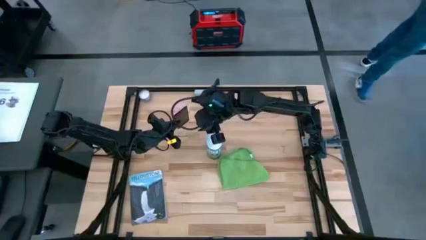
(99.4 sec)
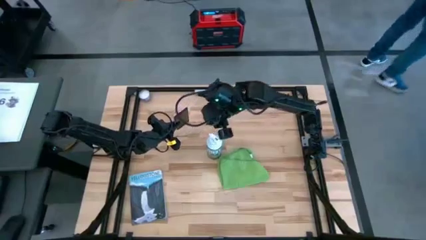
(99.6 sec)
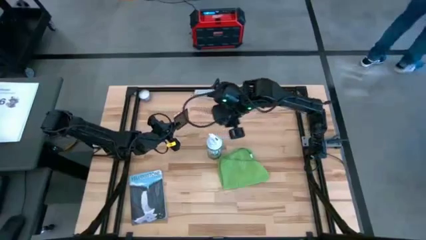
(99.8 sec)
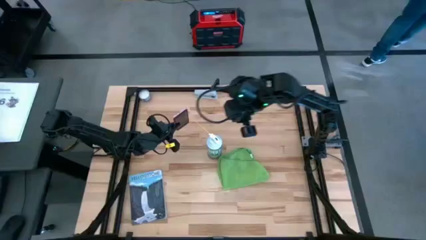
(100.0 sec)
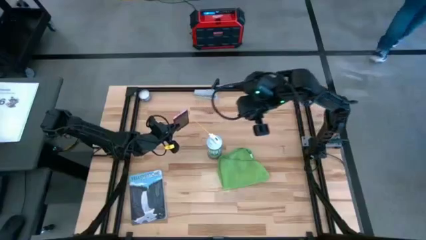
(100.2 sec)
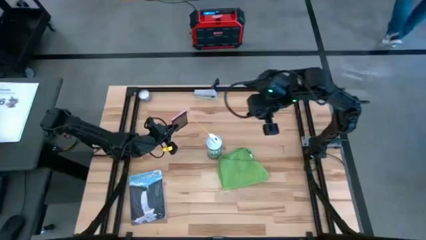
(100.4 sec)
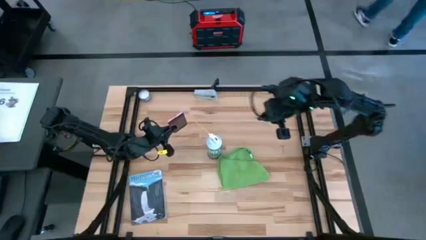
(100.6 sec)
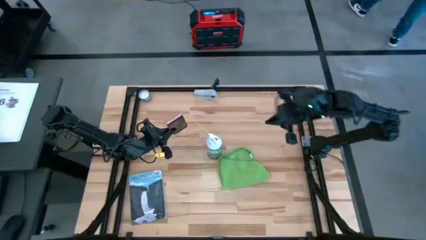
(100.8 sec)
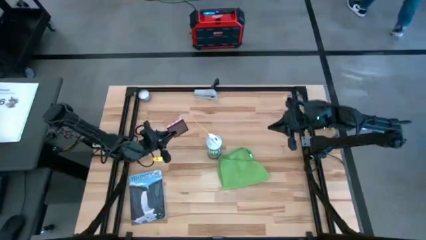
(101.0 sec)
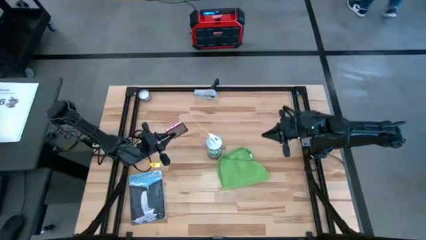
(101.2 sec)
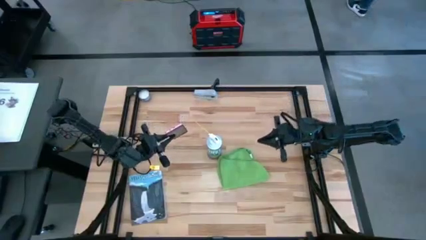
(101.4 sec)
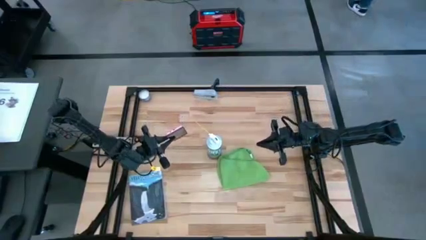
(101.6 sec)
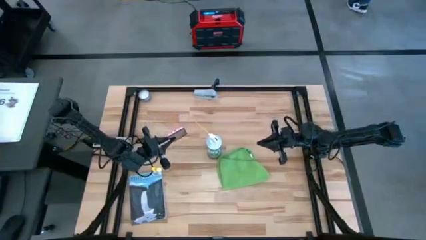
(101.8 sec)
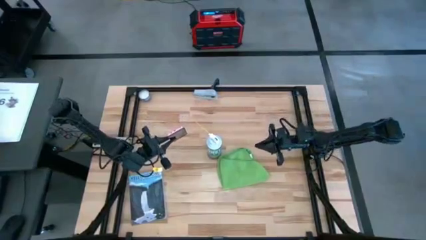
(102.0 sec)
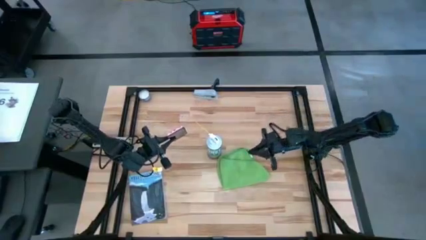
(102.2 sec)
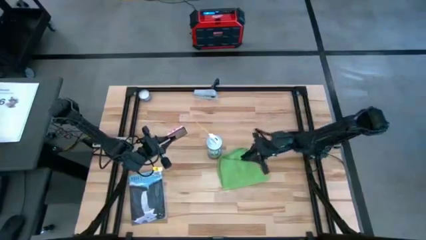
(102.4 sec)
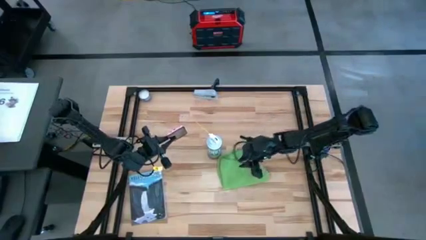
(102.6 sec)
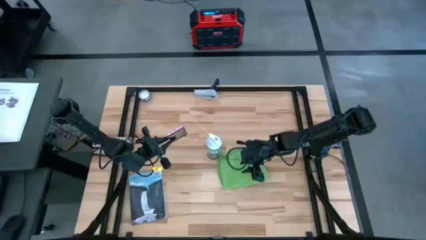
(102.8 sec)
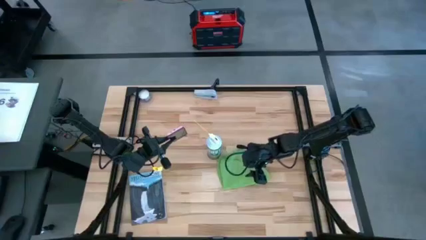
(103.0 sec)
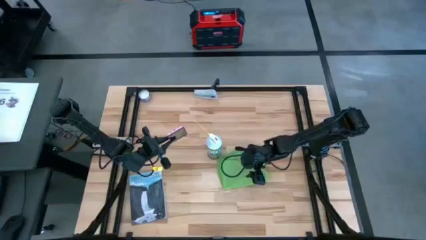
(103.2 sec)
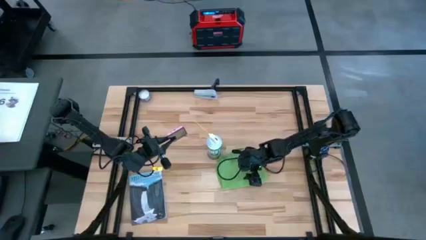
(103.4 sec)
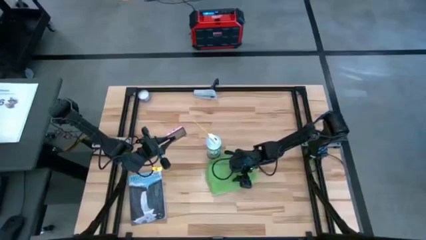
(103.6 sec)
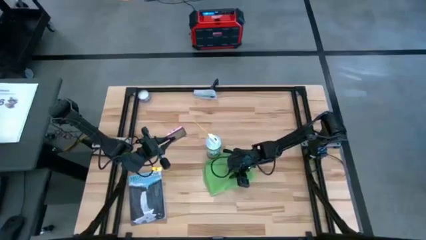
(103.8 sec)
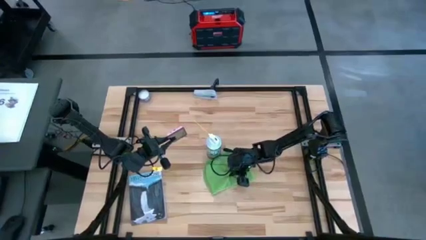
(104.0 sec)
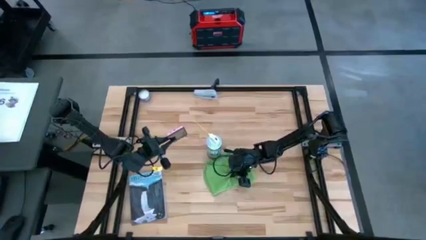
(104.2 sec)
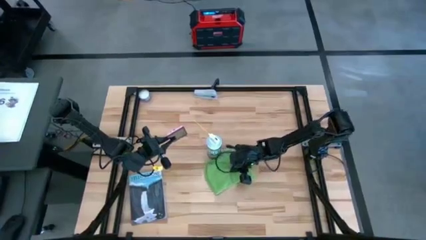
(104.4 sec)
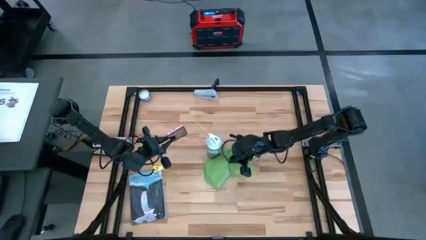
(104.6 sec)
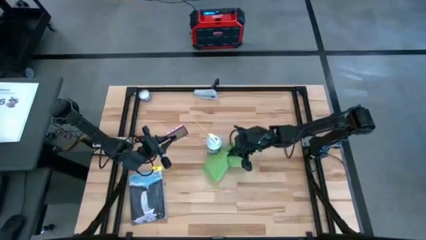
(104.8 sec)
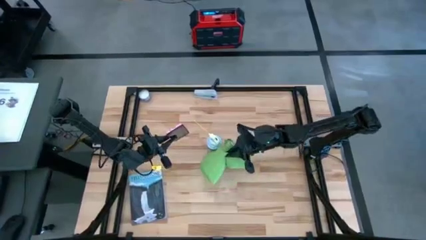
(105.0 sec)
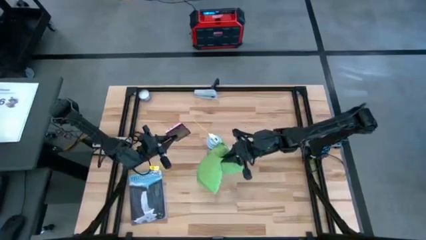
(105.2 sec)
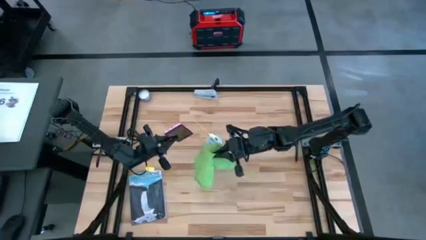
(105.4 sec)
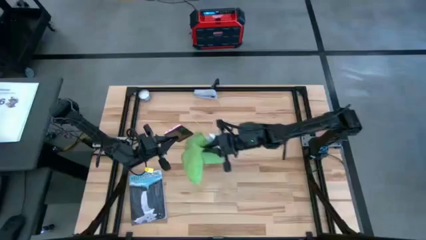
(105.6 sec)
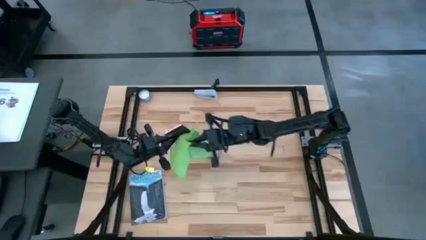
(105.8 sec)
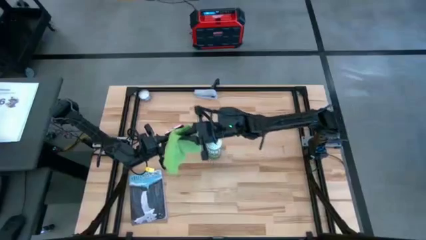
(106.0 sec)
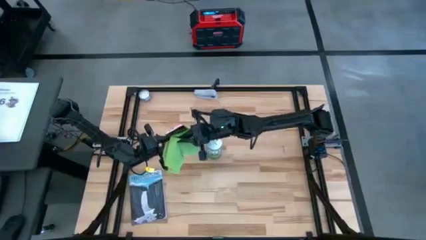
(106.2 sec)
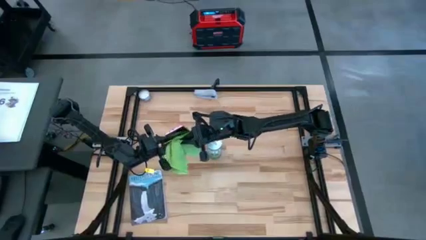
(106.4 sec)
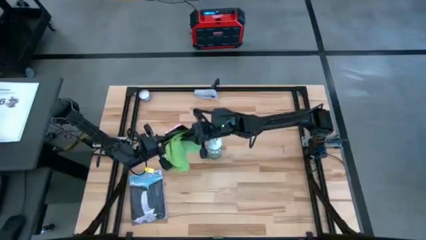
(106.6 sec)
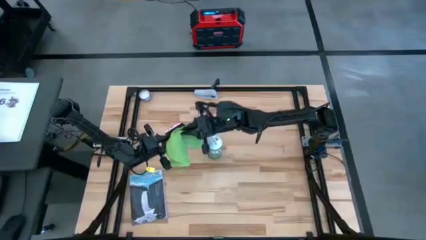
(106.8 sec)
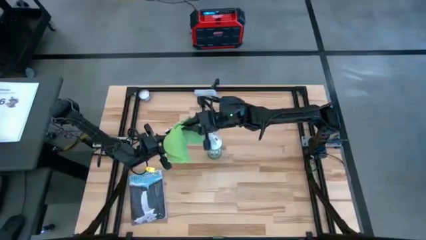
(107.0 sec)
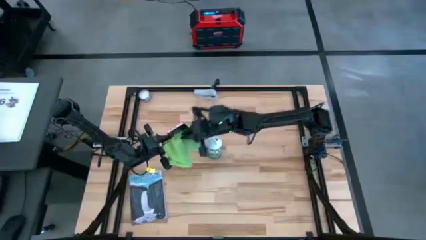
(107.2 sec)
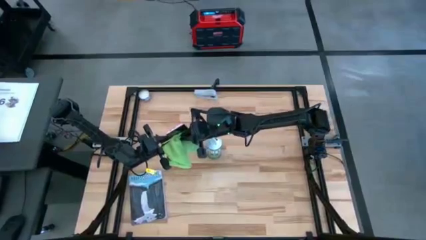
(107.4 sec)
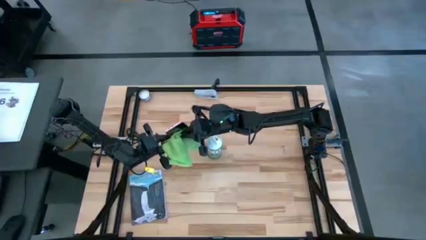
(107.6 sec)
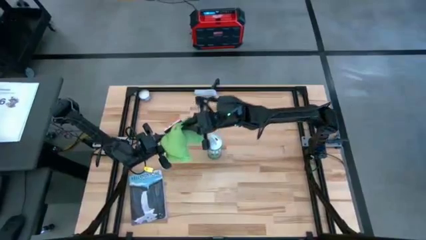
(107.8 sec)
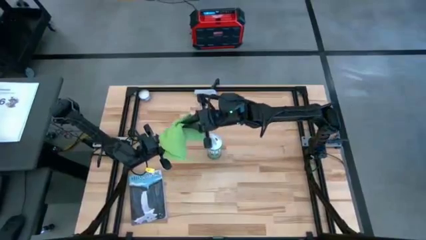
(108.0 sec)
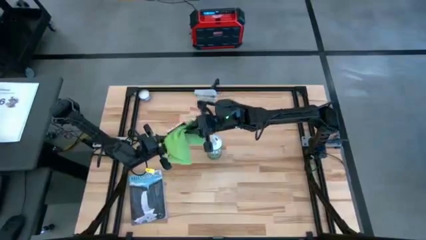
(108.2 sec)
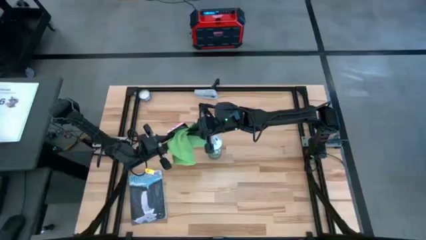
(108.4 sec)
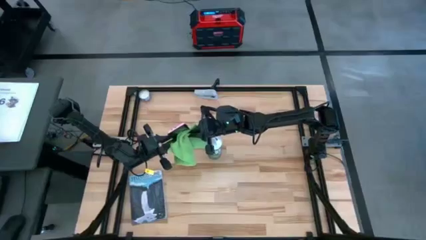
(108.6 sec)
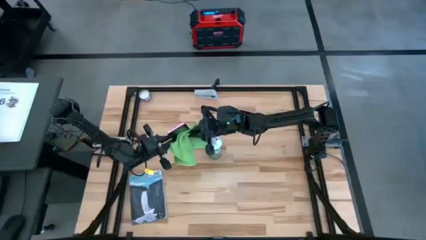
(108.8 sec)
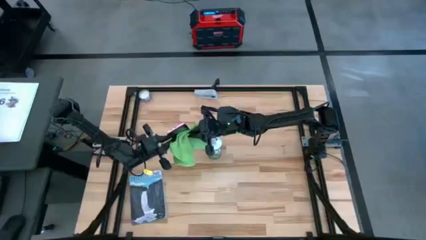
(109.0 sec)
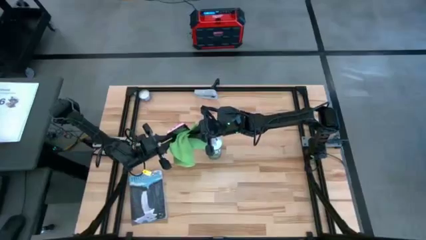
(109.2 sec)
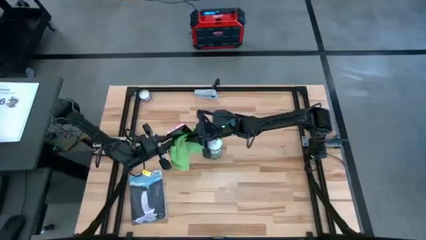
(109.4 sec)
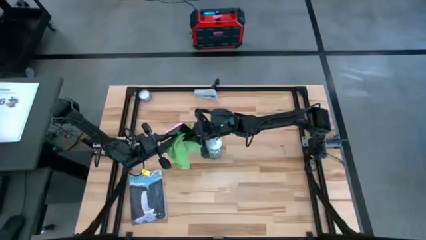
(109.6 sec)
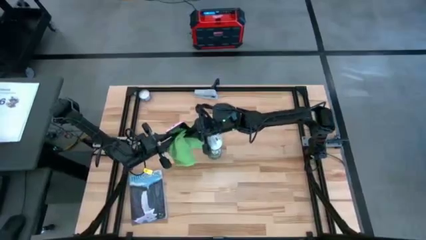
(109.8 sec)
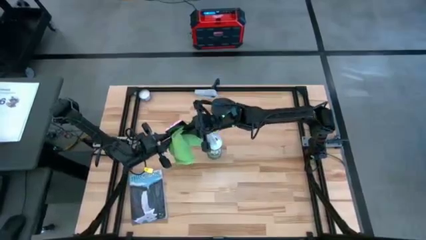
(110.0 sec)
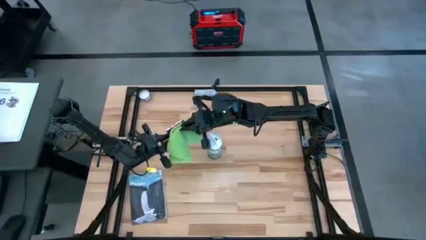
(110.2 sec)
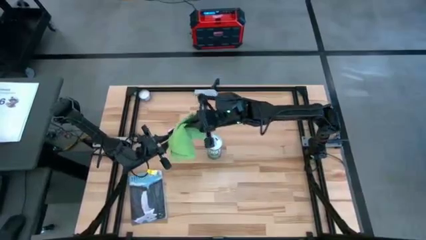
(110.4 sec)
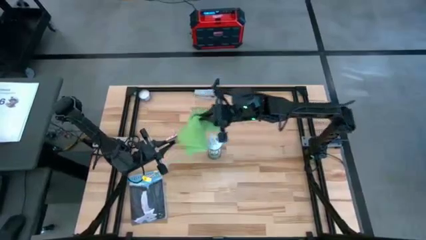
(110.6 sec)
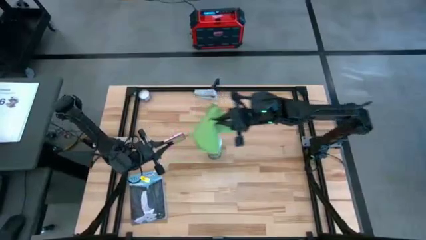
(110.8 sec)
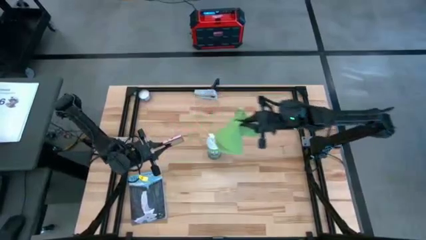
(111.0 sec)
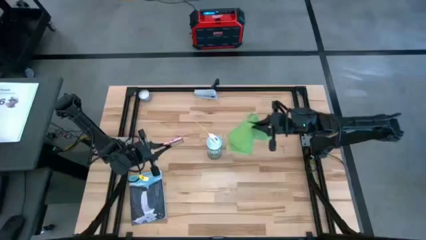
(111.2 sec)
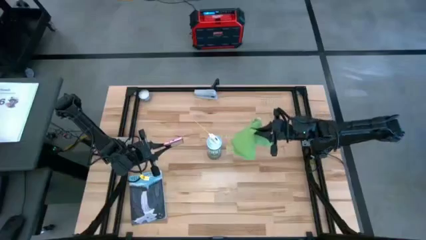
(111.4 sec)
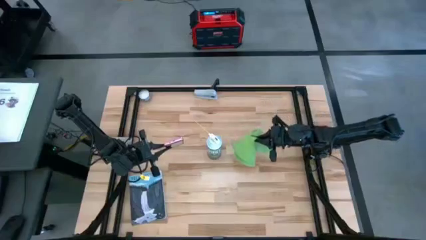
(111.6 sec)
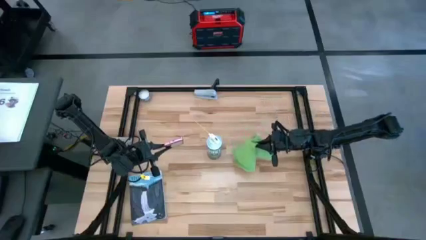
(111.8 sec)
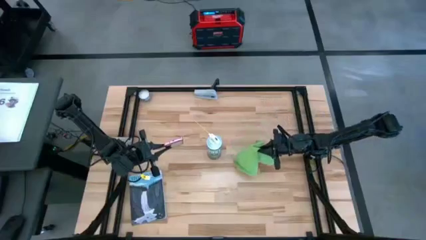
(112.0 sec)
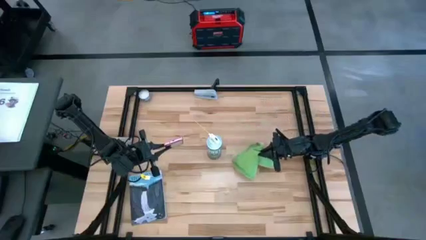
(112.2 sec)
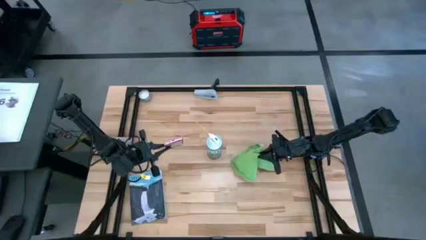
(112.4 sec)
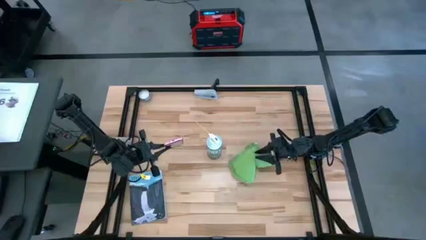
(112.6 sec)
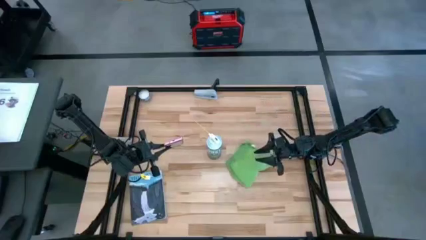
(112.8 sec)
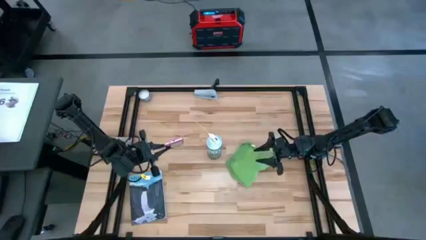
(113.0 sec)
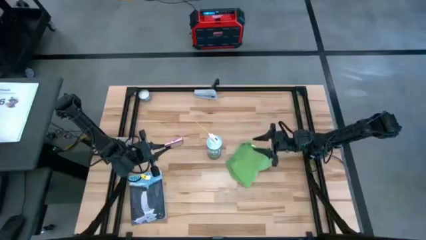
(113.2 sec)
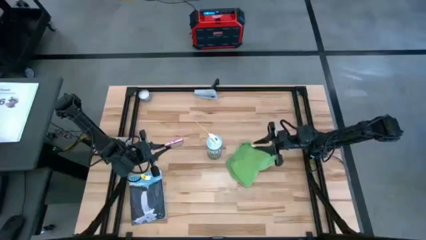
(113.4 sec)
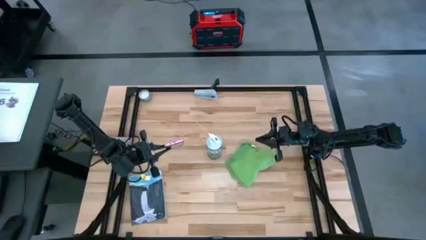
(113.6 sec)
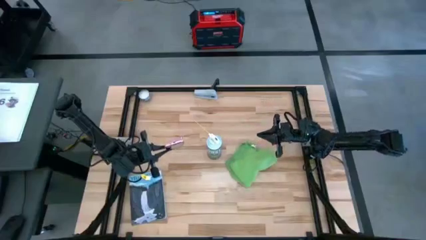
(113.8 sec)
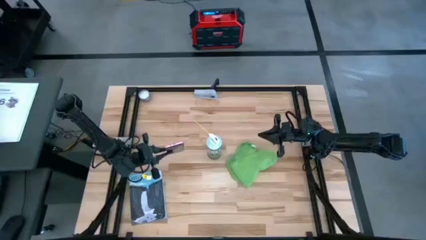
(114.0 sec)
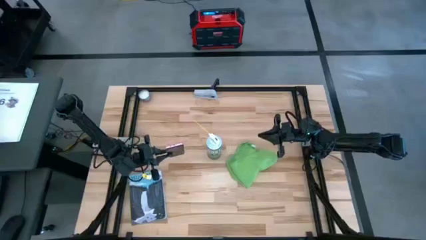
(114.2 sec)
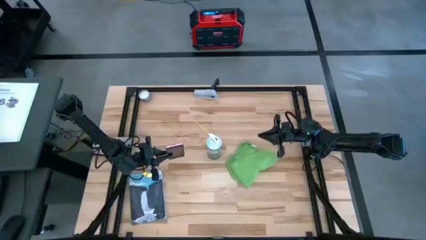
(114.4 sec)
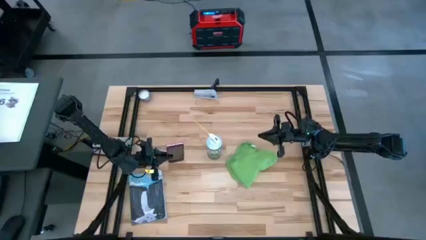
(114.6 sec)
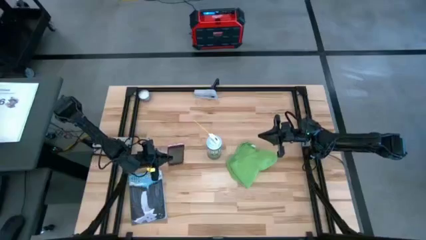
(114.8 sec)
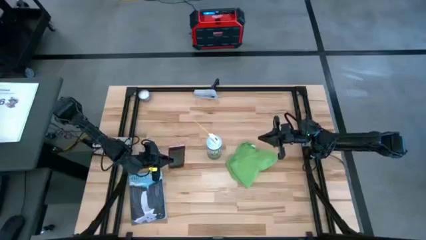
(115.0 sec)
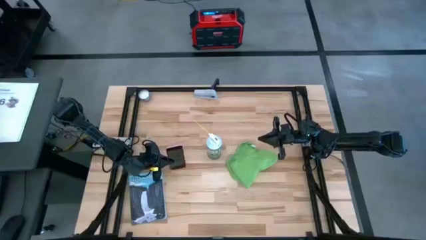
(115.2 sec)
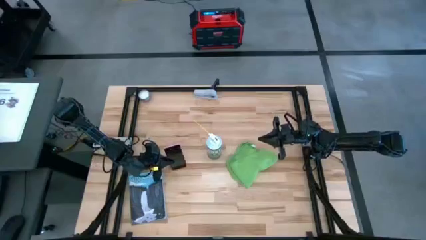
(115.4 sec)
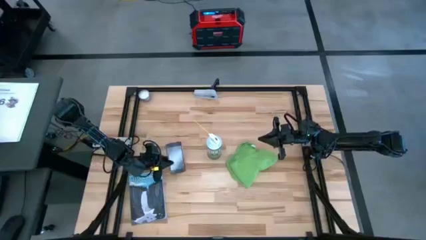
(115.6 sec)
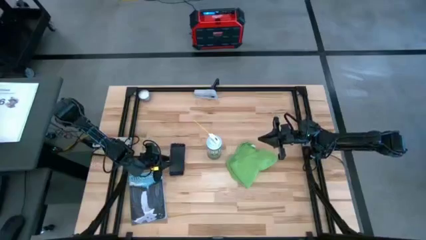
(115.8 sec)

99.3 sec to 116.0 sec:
Task: Apply microfiber cloth
Wipe pink cellphone with a microfiber cloth
